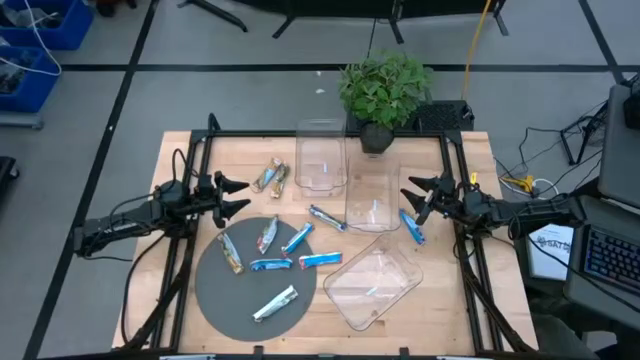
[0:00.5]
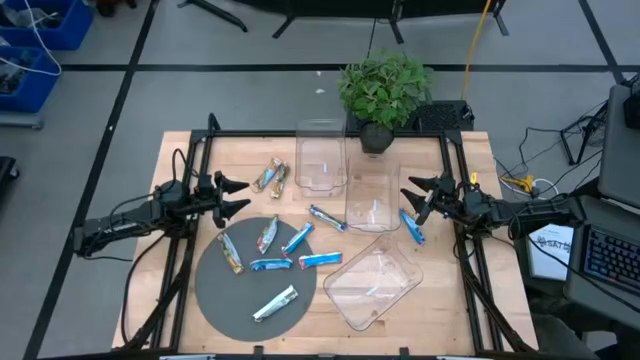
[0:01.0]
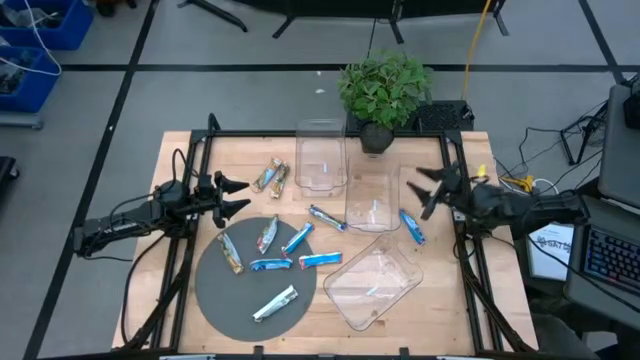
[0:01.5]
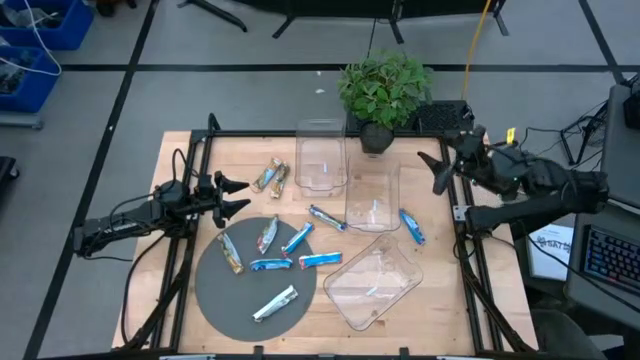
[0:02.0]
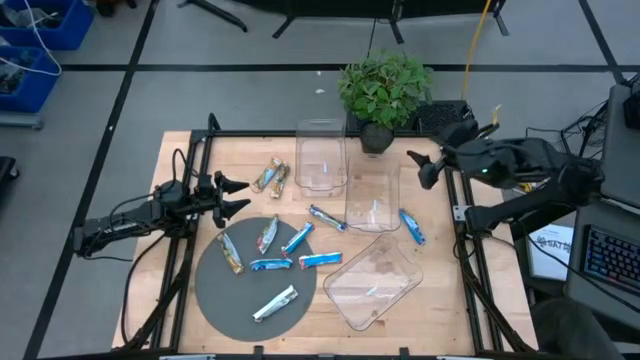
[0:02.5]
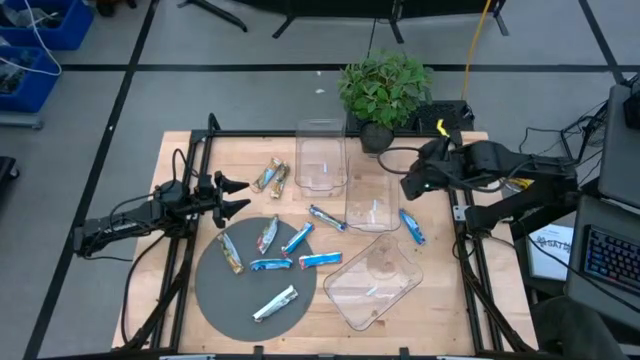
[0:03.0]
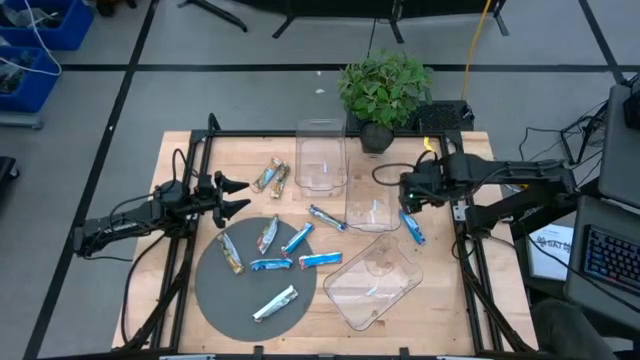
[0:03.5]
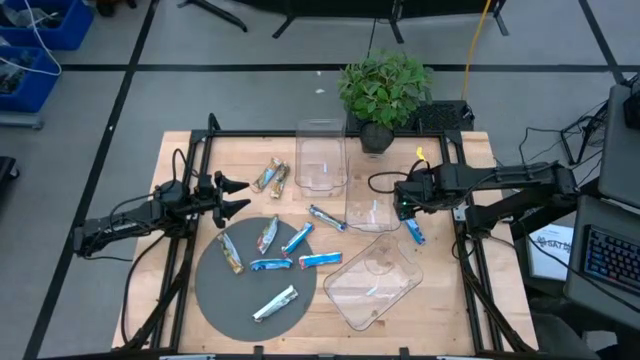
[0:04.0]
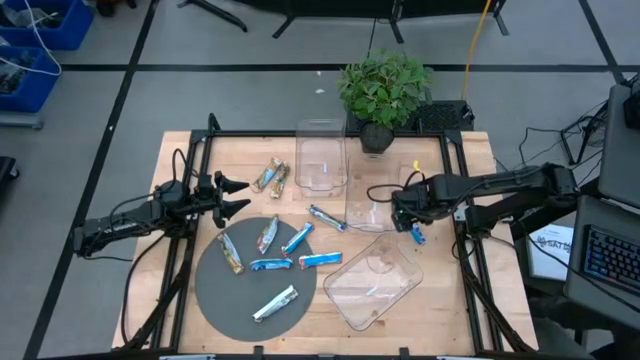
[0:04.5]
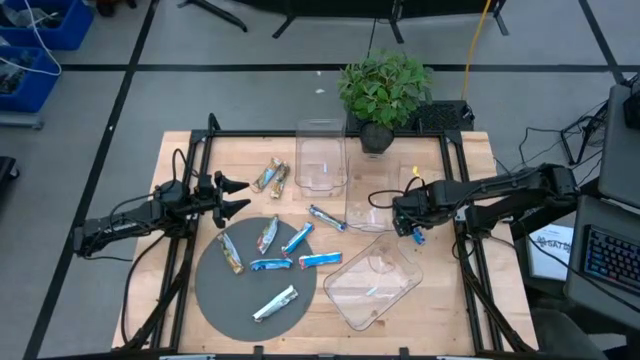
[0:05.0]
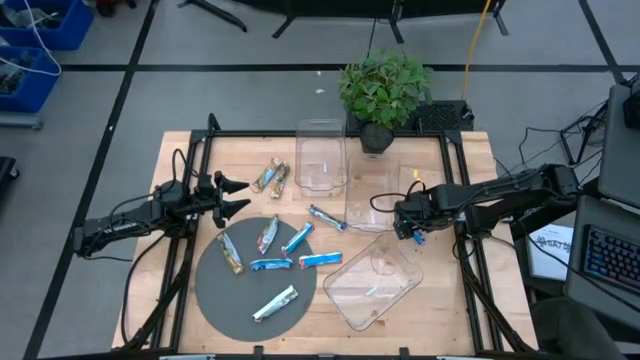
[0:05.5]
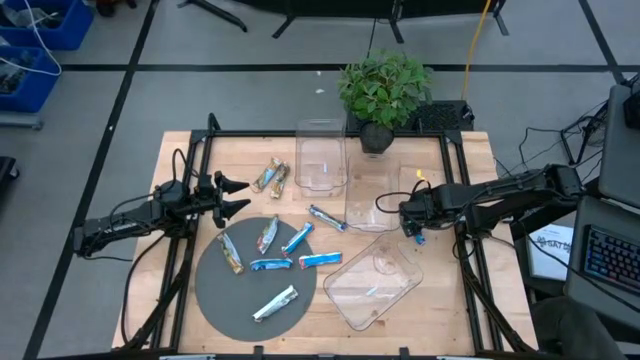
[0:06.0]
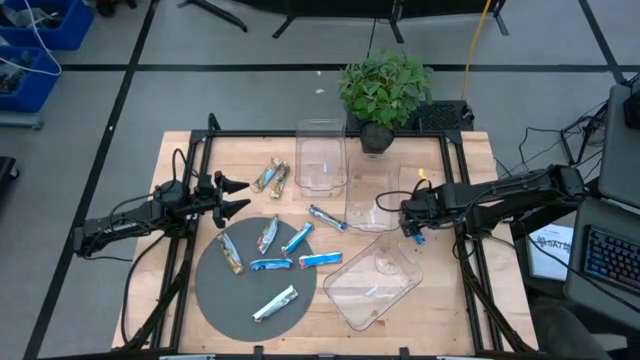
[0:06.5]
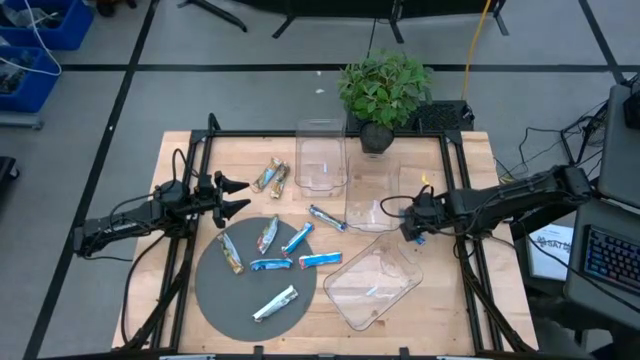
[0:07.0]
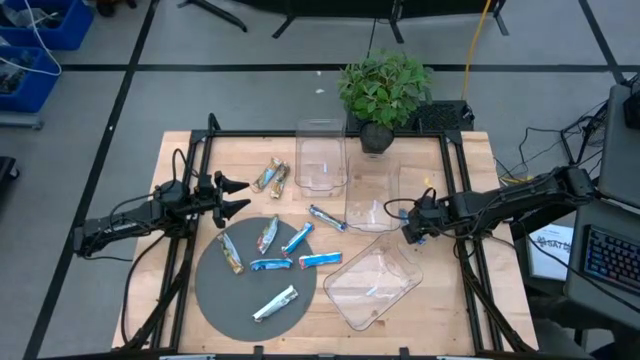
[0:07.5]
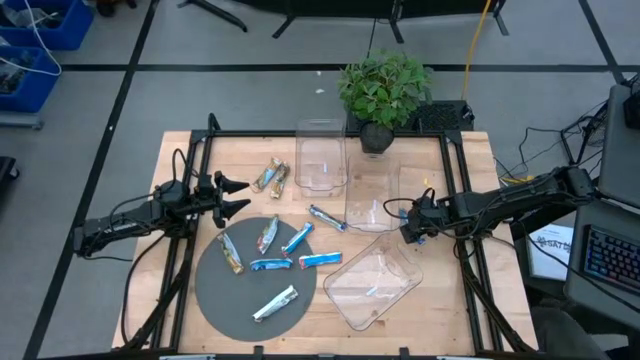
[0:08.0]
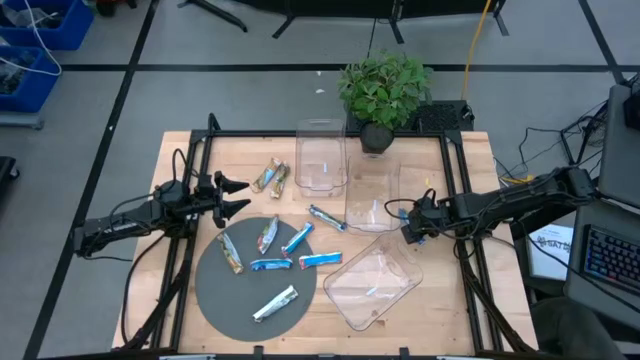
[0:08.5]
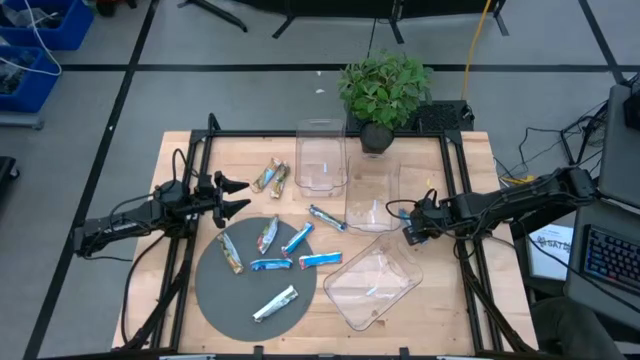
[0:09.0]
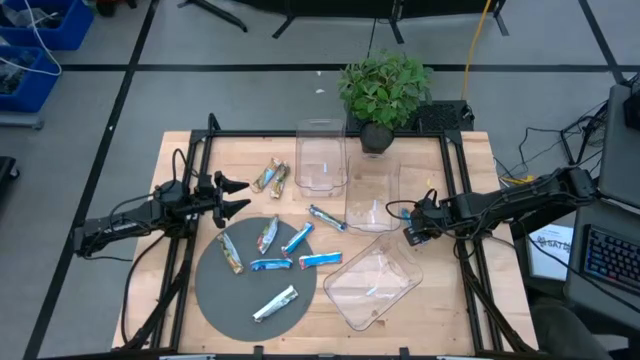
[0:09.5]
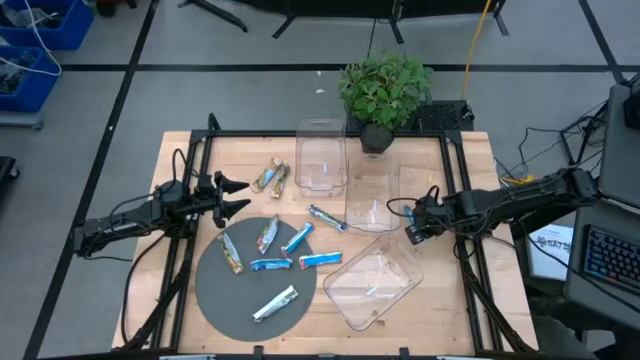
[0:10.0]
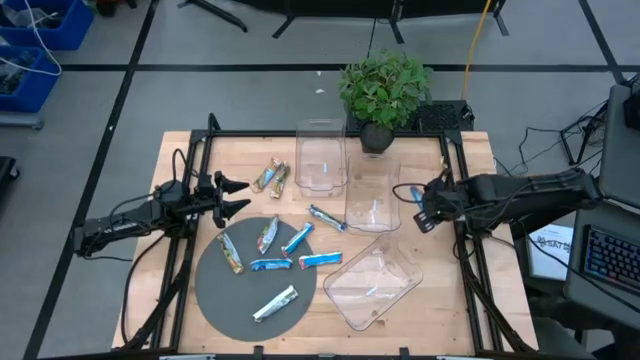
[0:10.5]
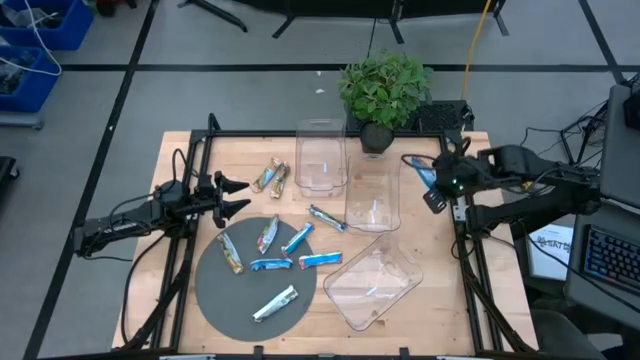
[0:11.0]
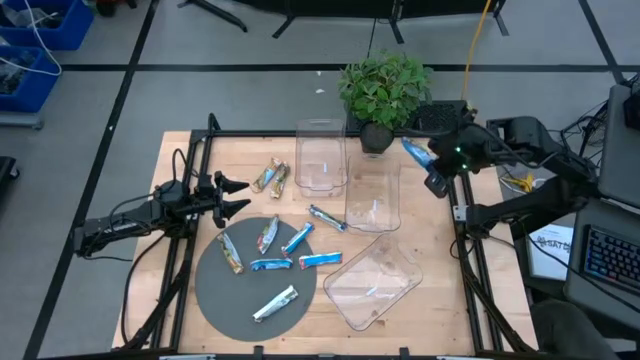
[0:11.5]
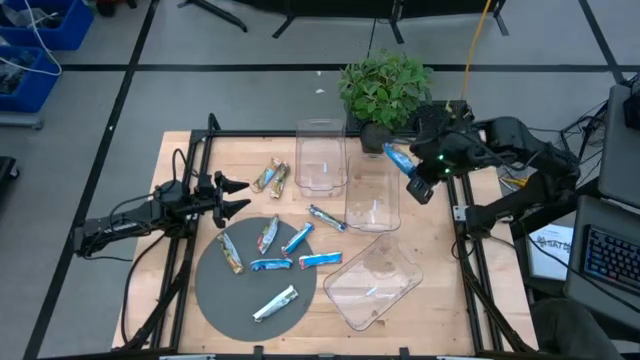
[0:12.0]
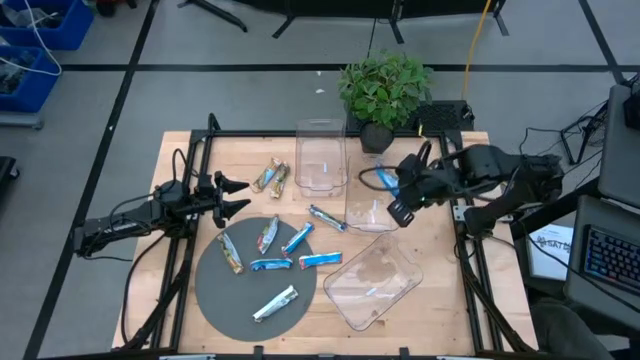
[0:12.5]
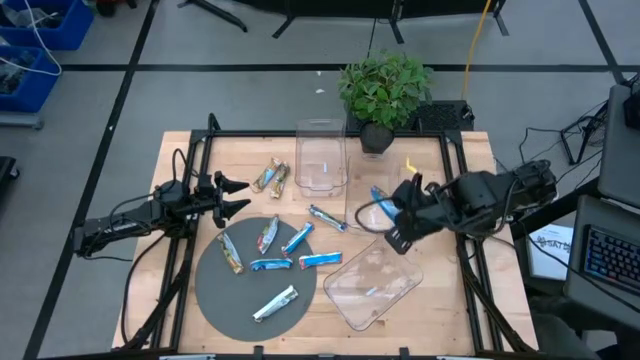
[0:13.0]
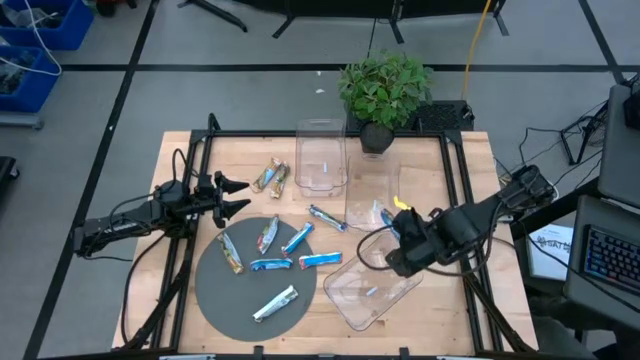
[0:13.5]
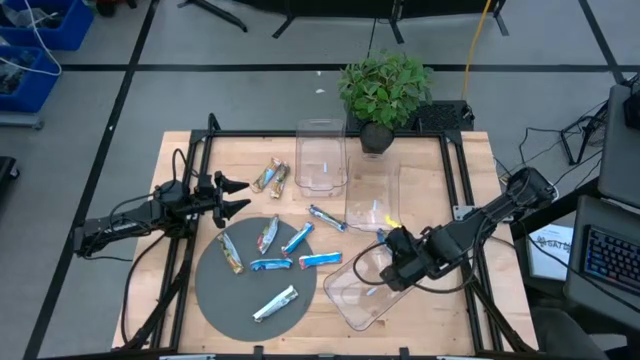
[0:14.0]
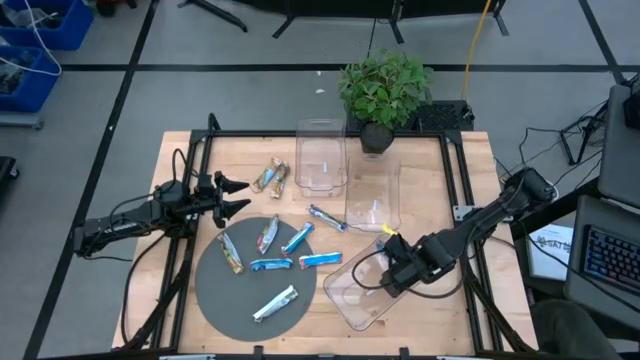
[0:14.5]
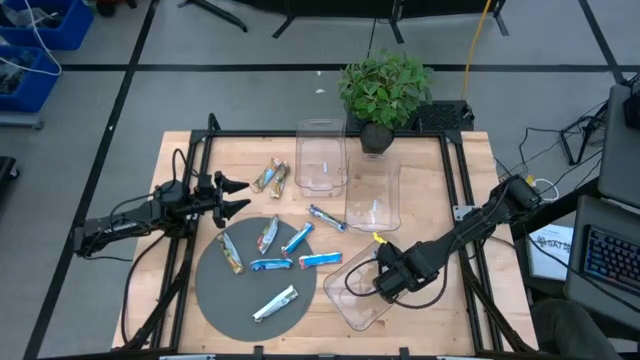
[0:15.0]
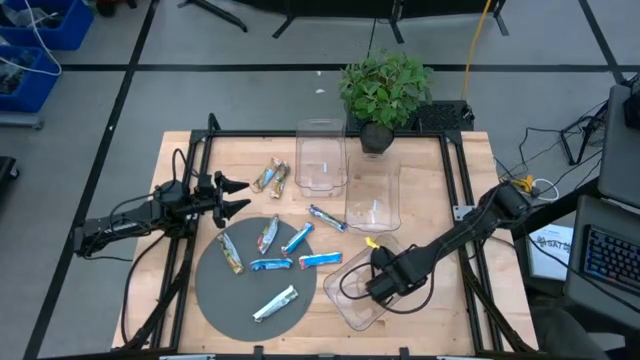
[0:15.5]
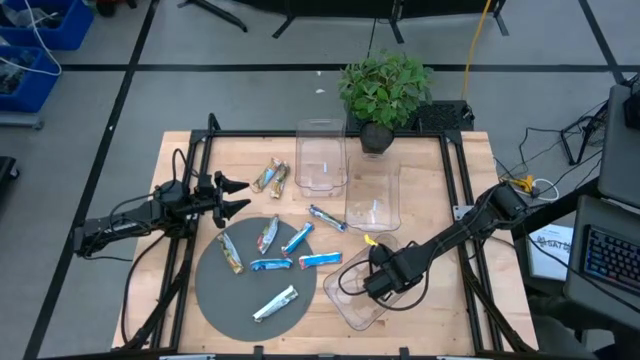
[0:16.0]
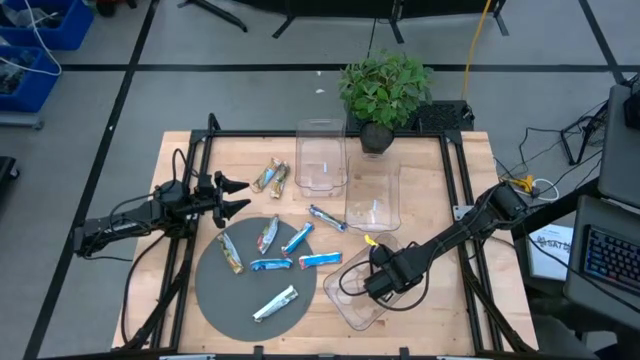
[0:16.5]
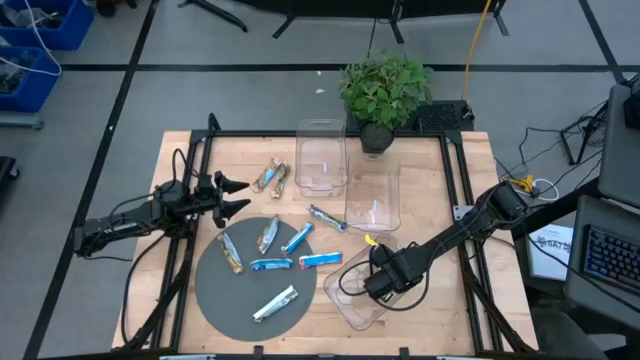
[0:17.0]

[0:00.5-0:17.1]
Task: Pick and place Granola Bars by type
Put the blue granola bar into the bottom transparent bin
